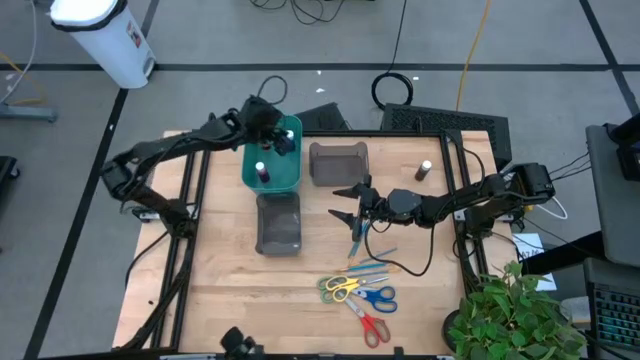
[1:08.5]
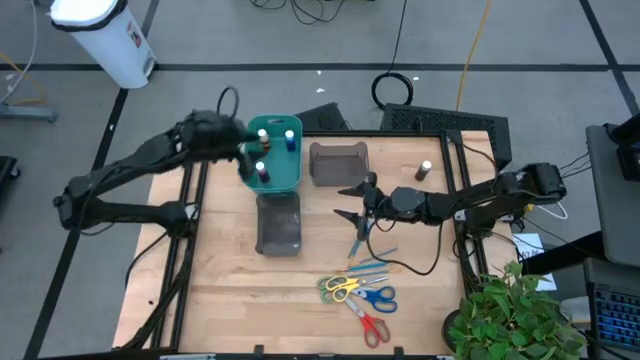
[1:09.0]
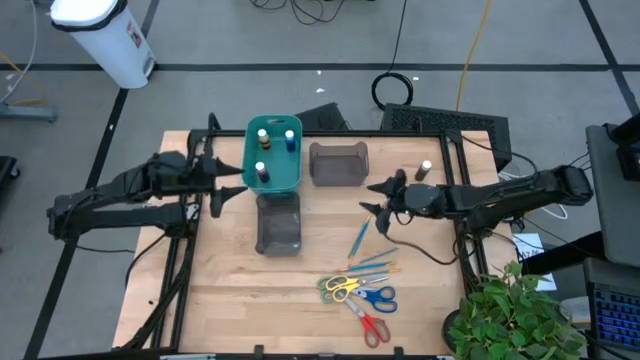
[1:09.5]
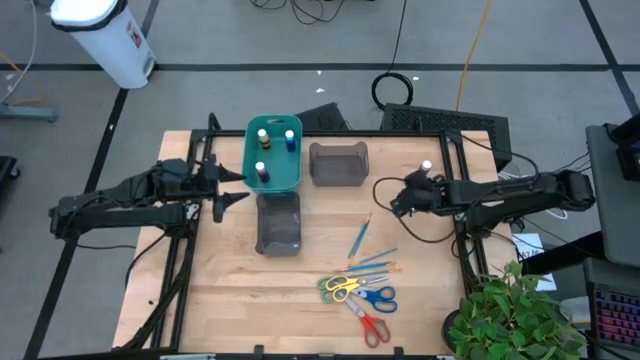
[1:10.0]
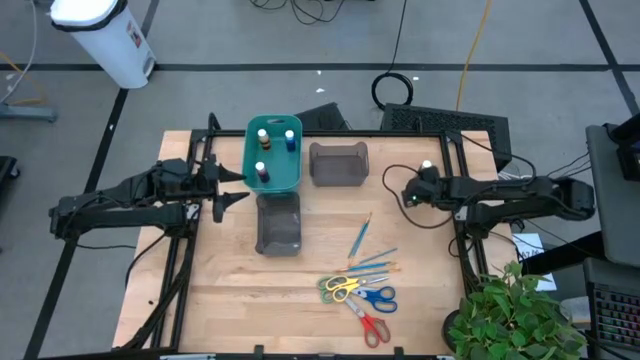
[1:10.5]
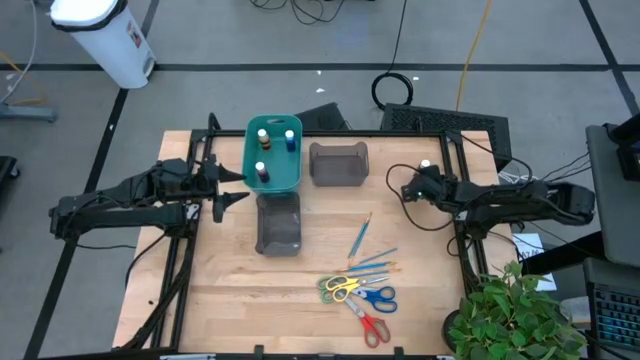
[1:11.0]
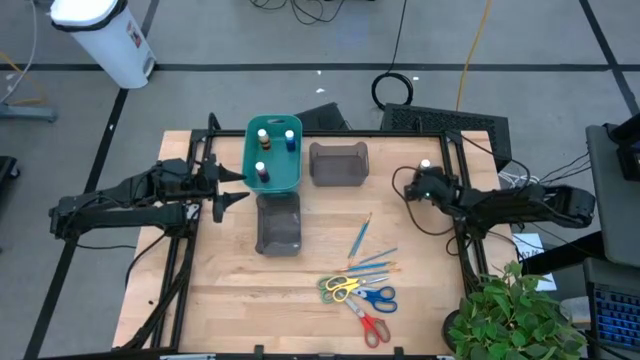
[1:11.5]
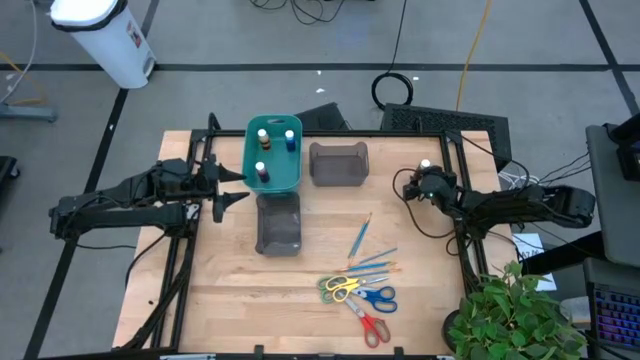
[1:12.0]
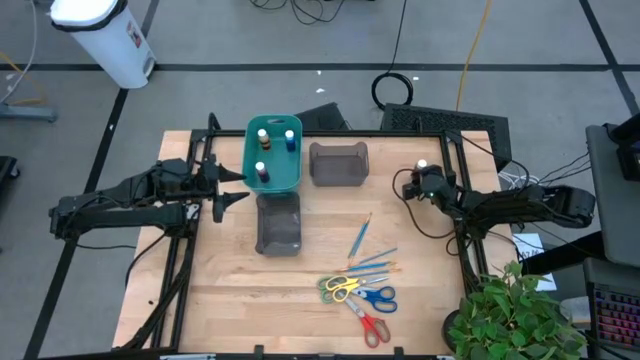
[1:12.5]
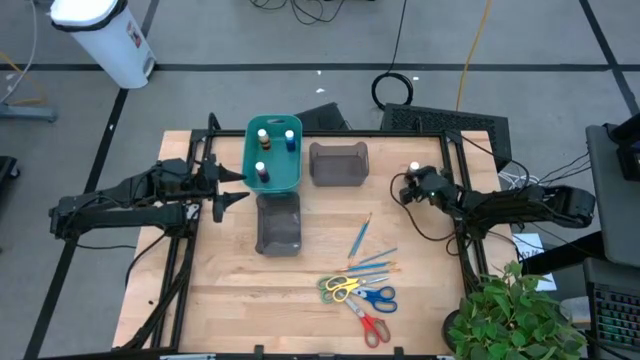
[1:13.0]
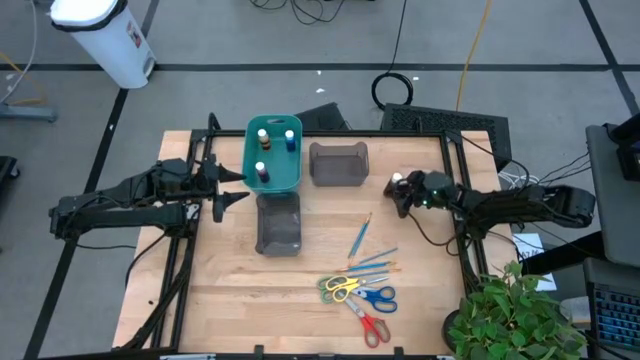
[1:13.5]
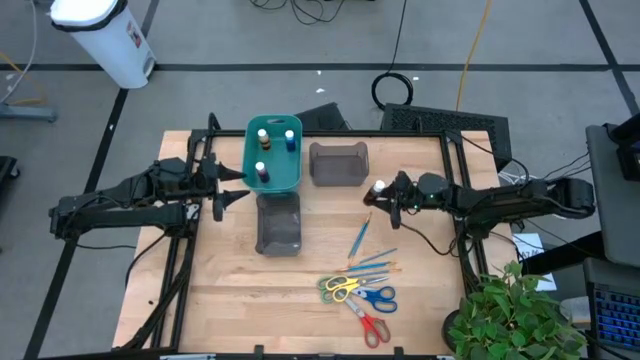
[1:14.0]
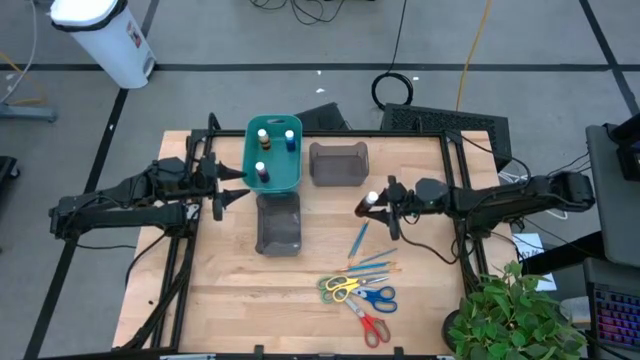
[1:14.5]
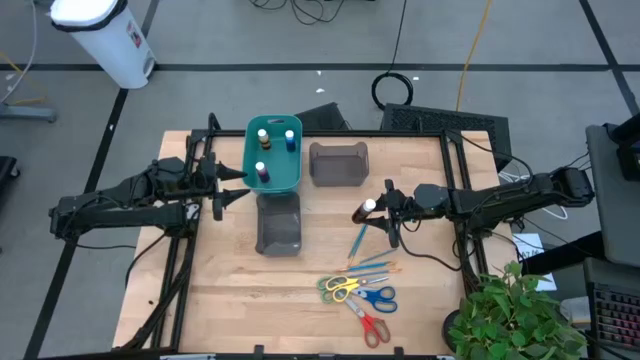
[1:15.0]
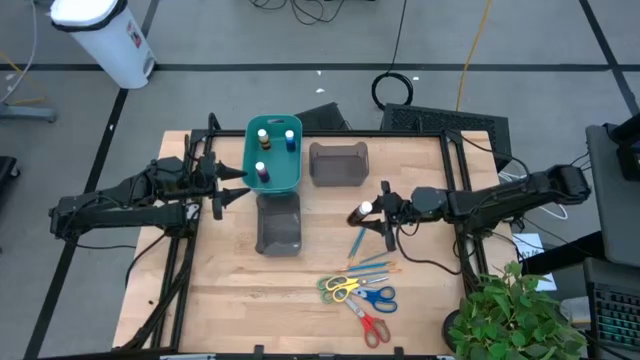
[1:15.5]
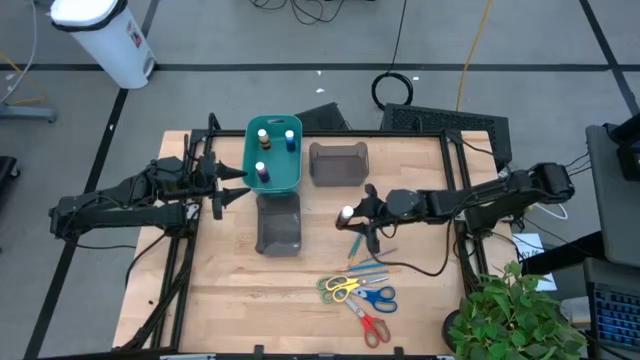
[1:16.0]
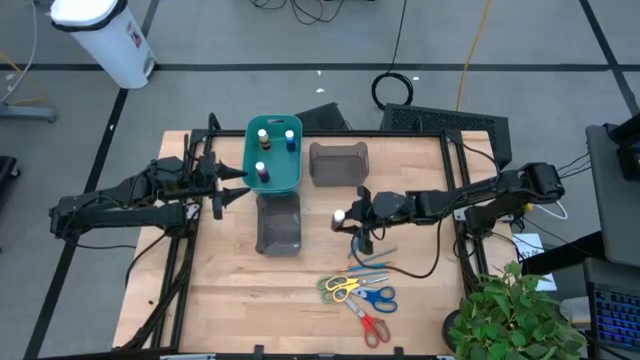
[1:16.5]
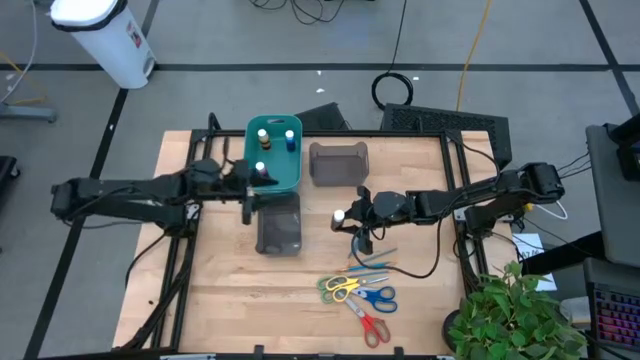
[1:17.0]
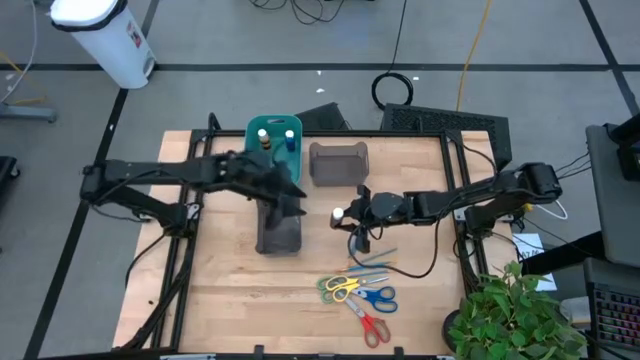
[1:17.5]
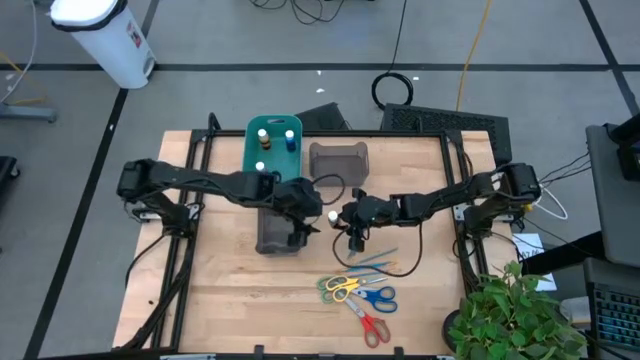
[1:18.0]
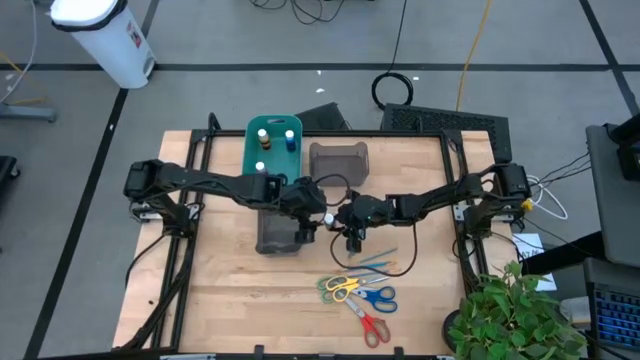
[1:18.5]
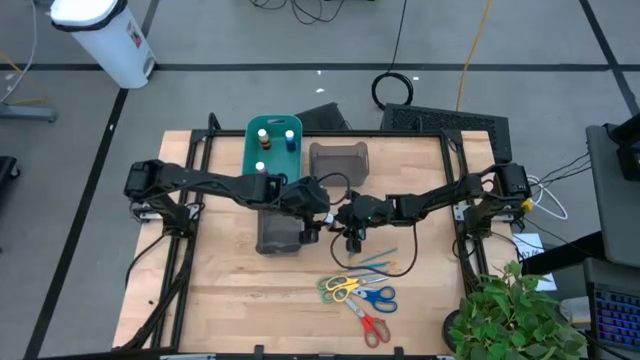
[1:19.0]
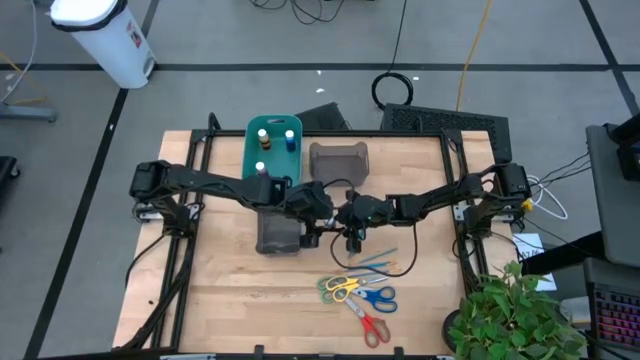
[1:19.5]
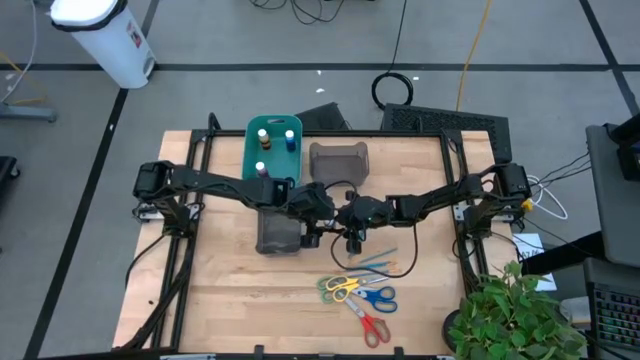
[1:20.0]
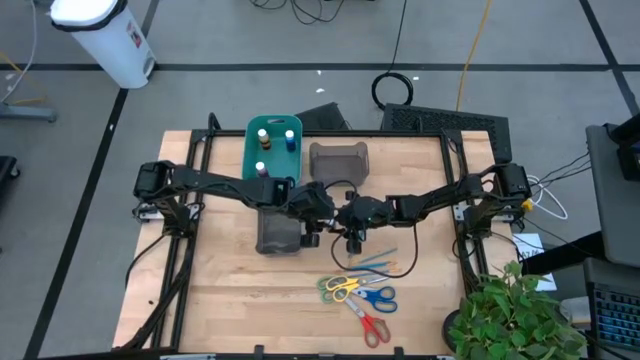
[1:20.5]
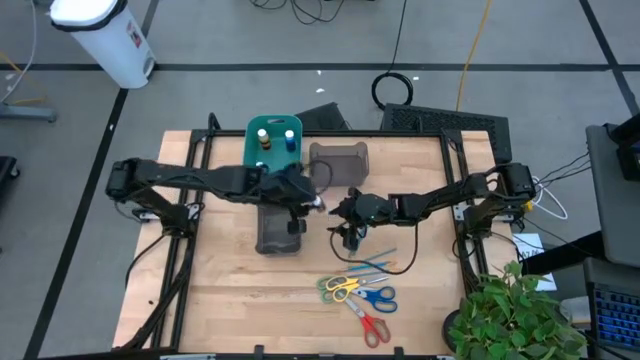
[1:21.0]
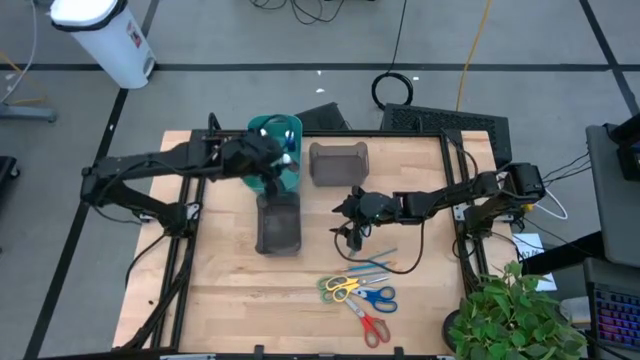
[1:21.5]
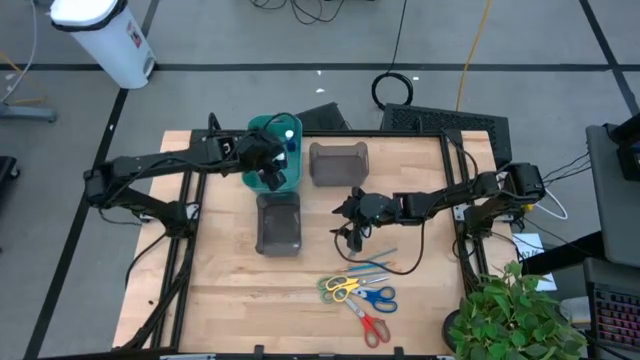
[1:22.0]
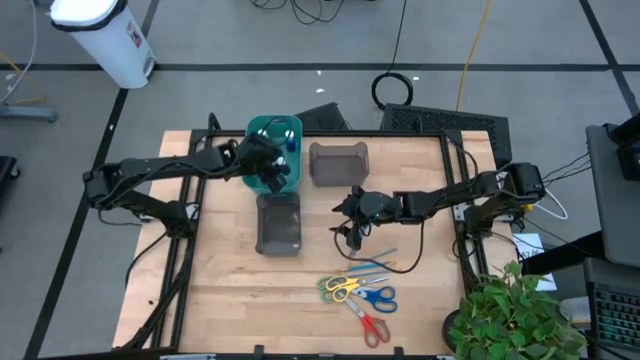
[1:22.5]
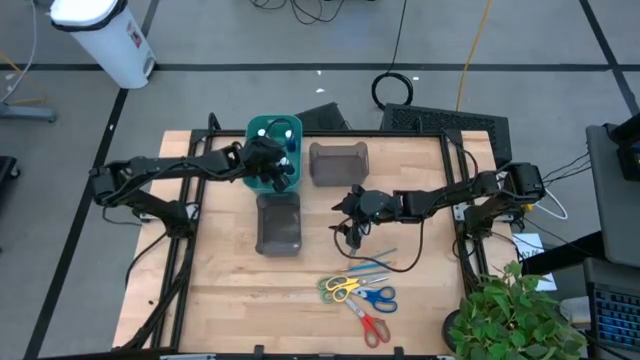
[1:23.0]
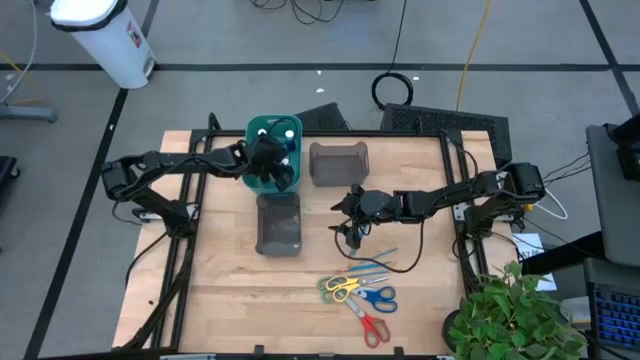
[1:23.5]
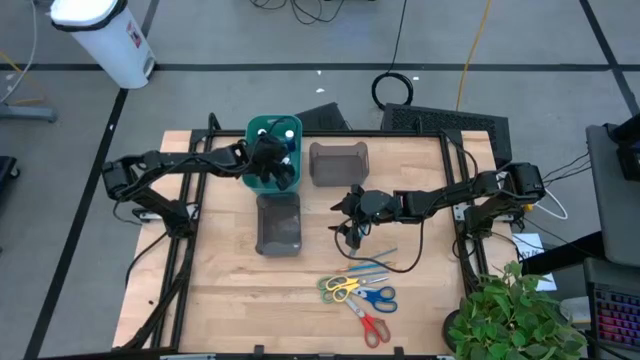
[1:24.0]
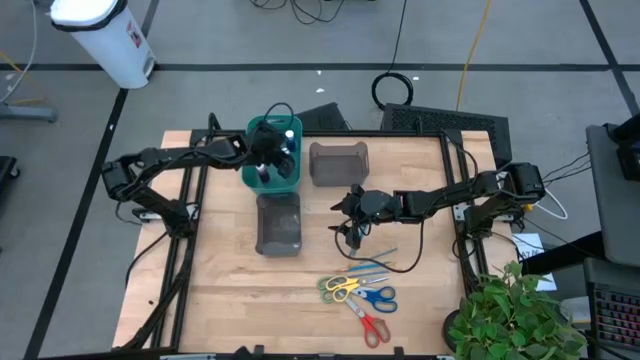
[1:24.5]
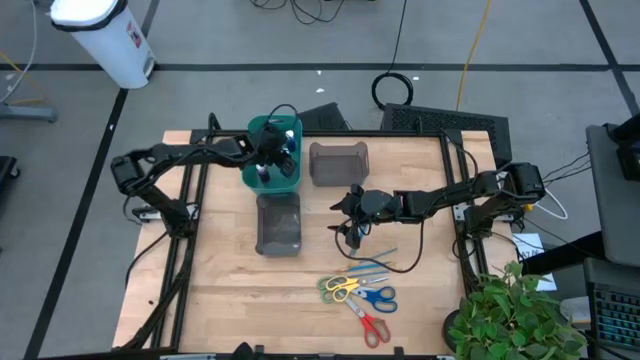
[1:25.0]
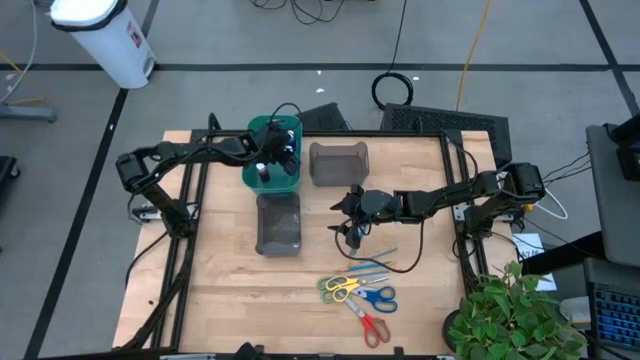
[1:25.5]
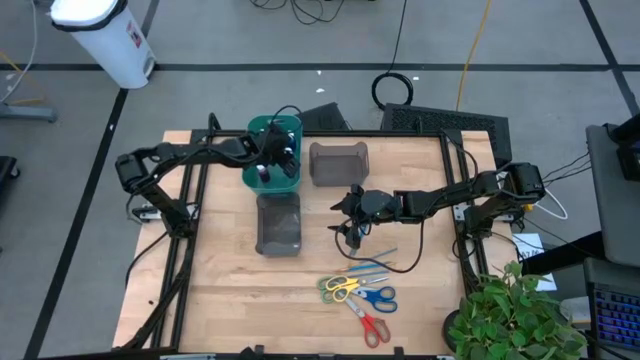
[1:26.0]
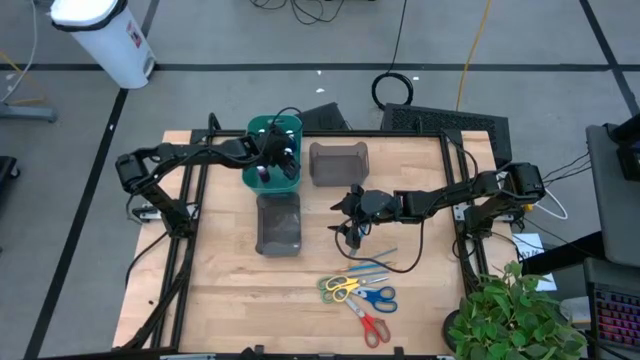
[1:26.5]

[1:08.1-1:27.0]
Task: Pick & Place Paint Supplies
Put the black paint bottle into the blue bin
